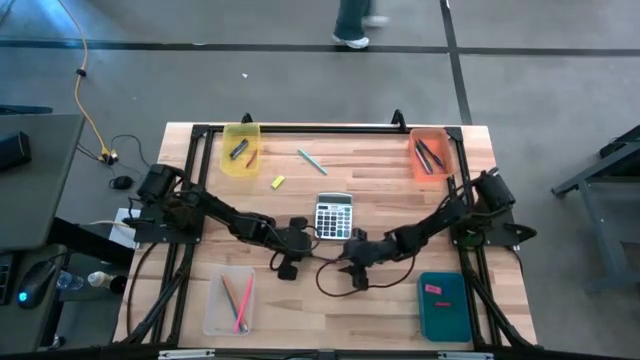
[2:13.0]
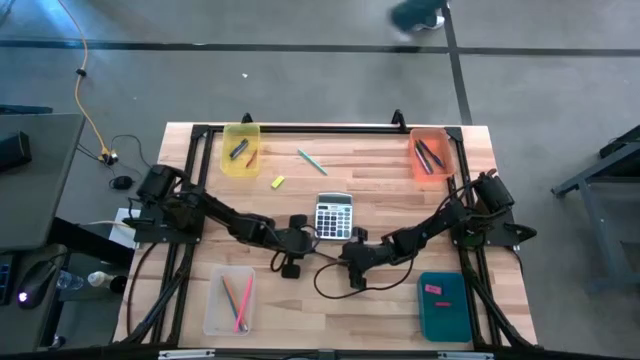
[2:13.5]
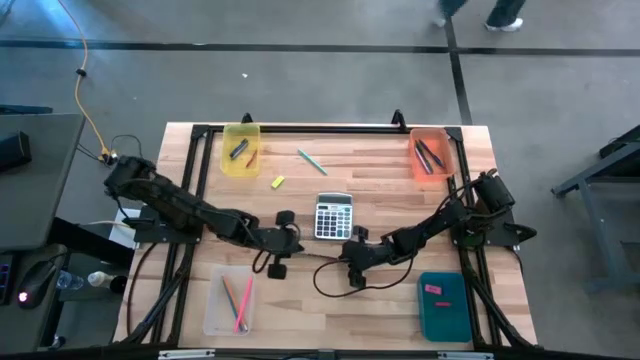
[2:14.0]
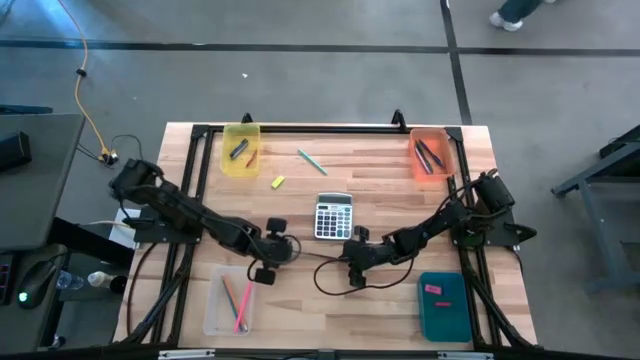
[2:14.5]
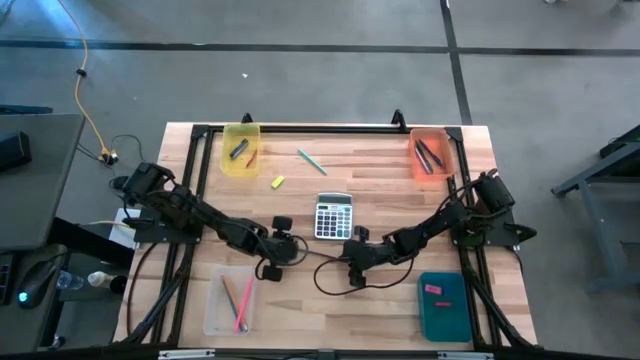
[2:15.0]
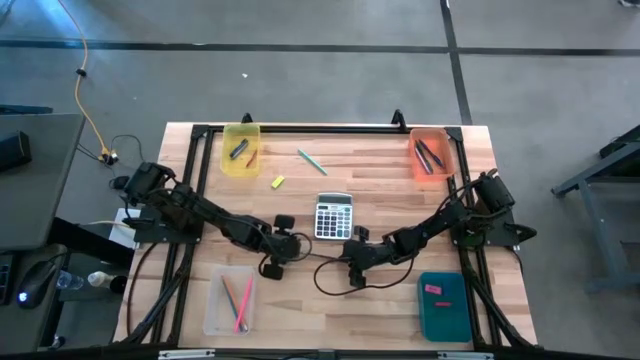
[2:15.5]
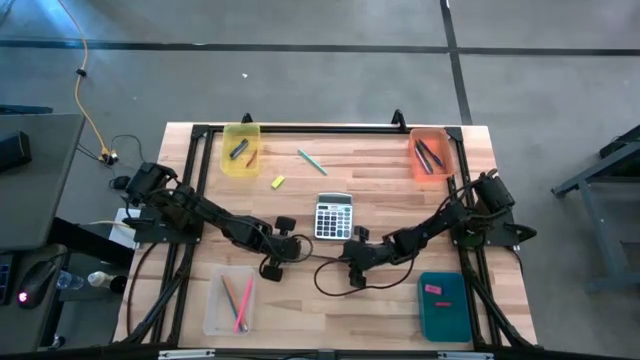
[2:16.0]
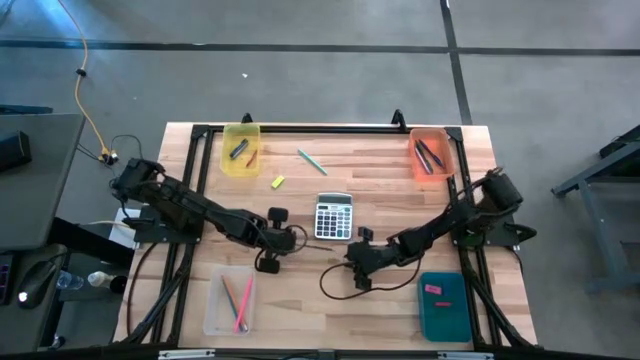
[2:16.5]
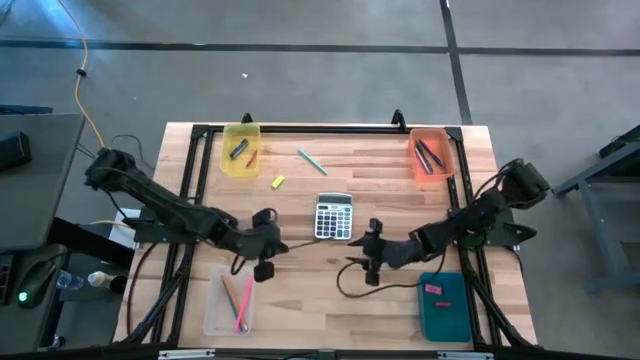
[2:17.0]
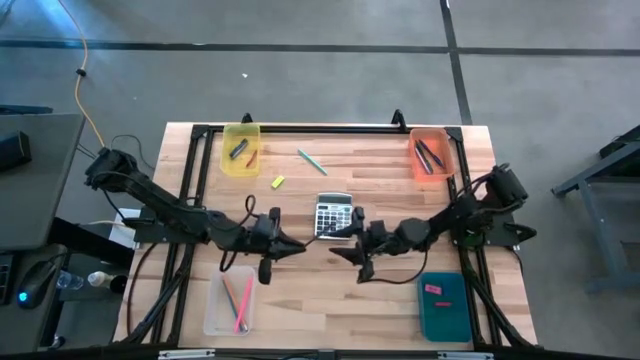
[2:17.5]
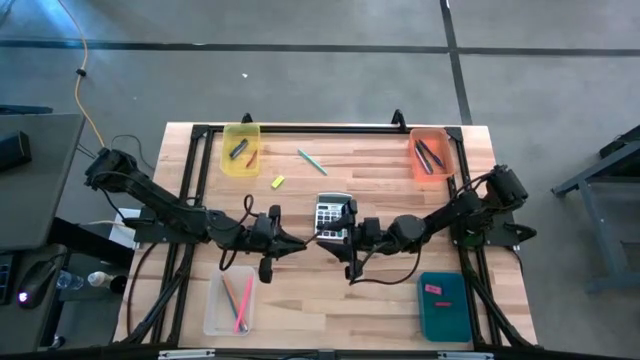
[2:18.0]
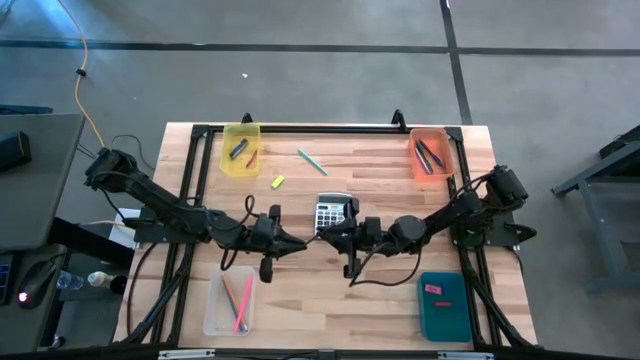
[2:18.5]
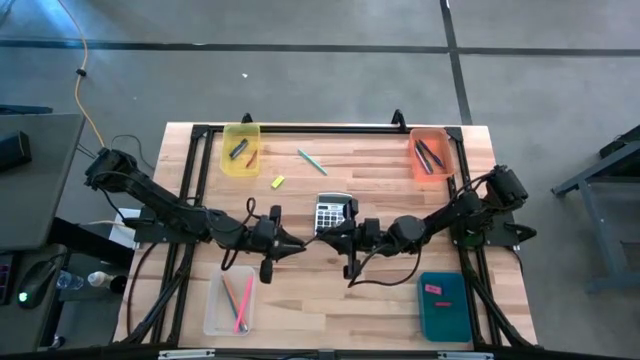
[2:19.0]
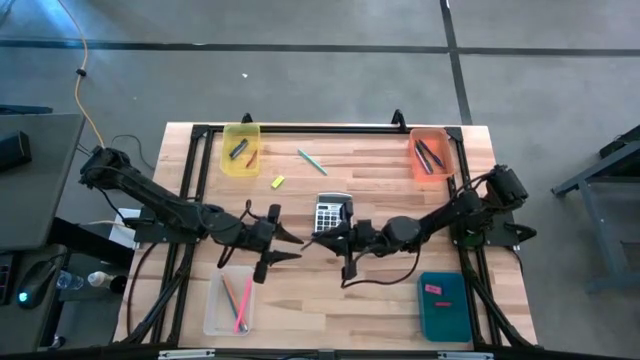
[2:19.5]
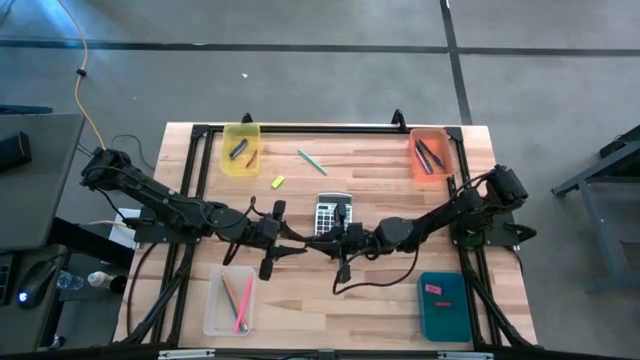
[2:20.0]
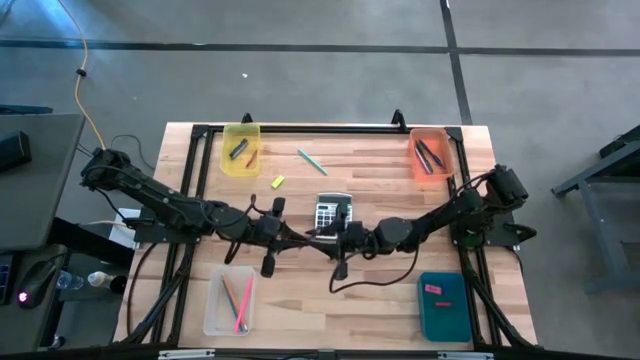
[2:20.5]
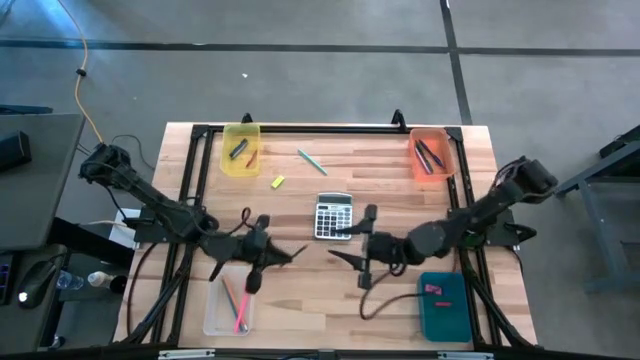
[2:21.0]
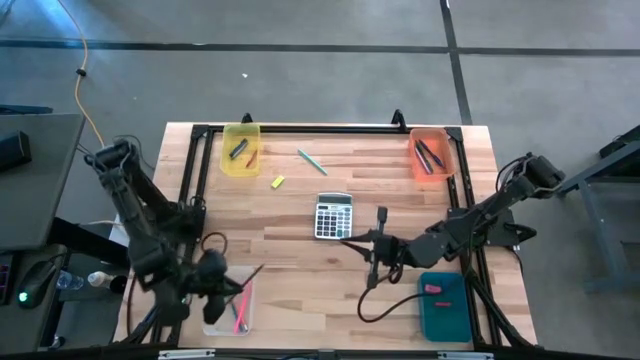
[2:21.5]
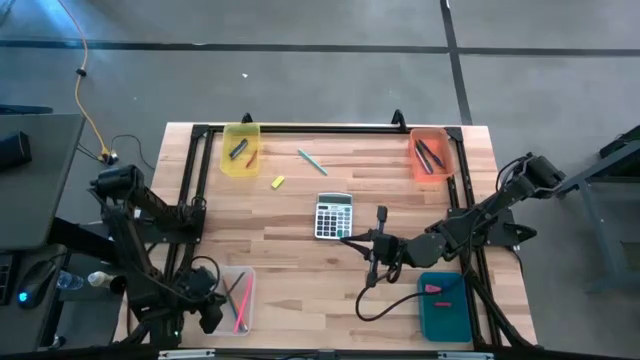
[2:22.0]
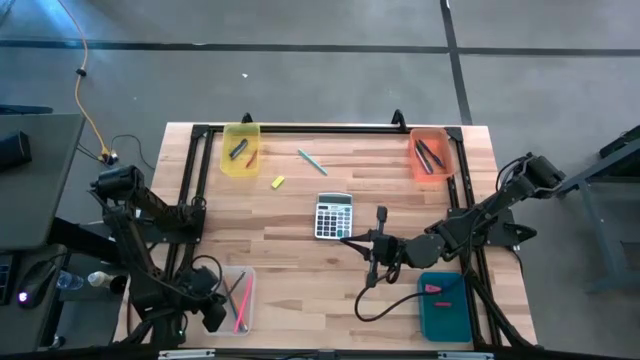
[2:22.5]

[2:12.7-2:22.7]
Task: Sort crayons/erasers/pens/pencils in bins
Put the black colored pencil into the transparent bin

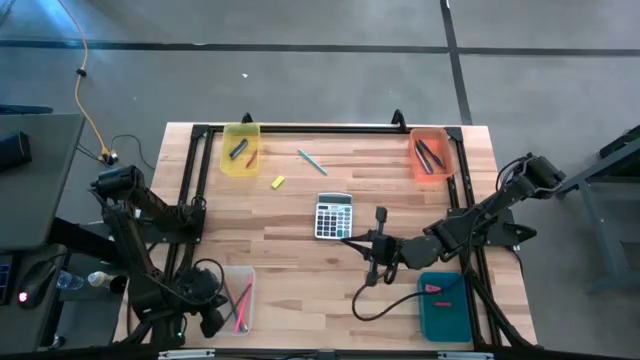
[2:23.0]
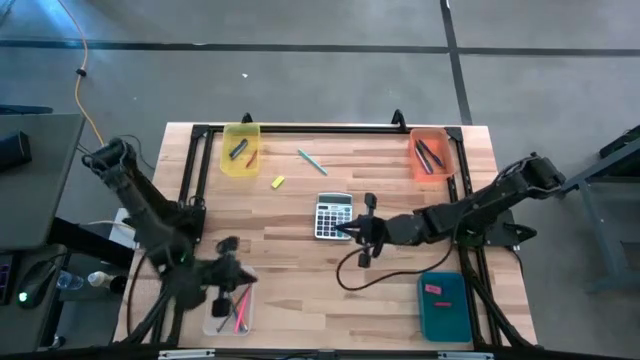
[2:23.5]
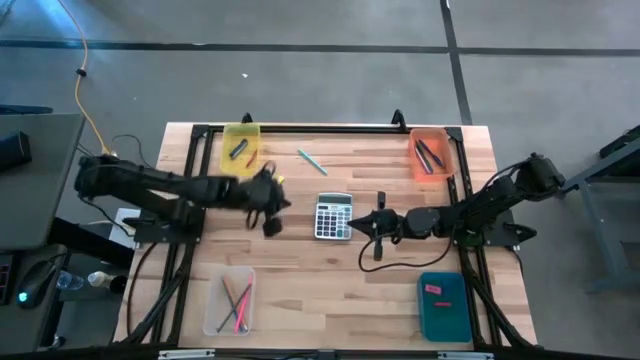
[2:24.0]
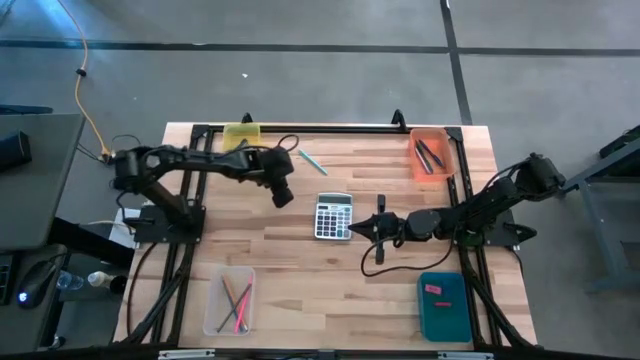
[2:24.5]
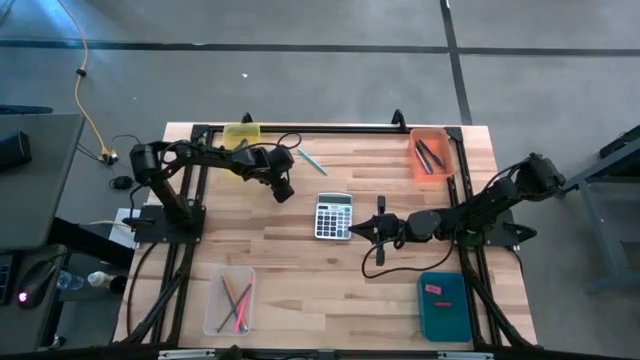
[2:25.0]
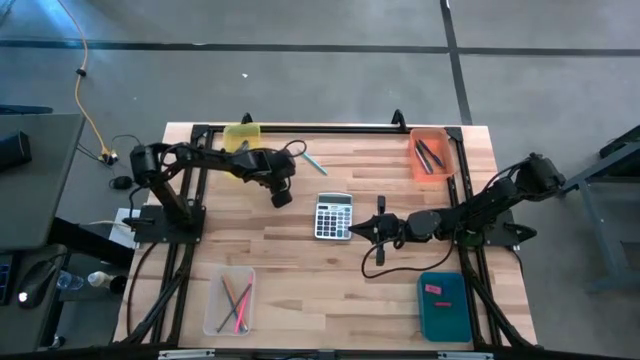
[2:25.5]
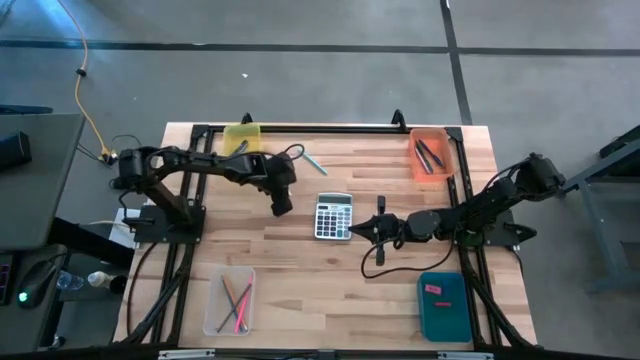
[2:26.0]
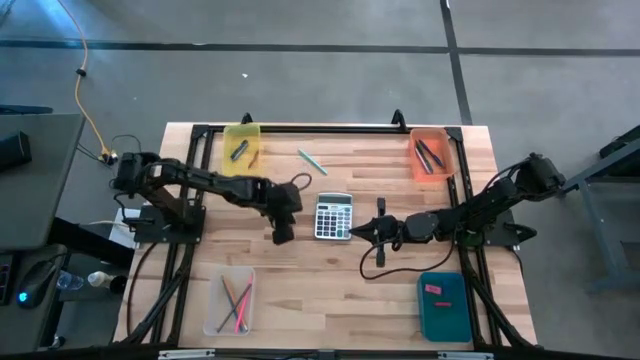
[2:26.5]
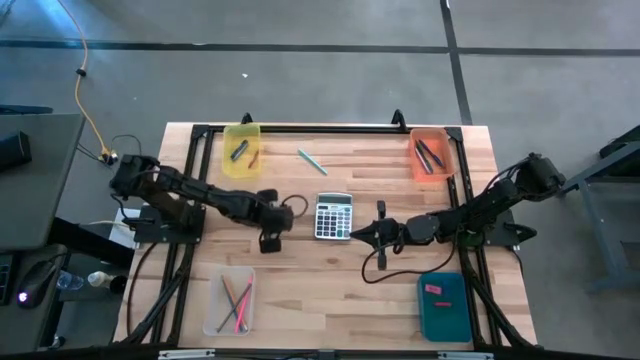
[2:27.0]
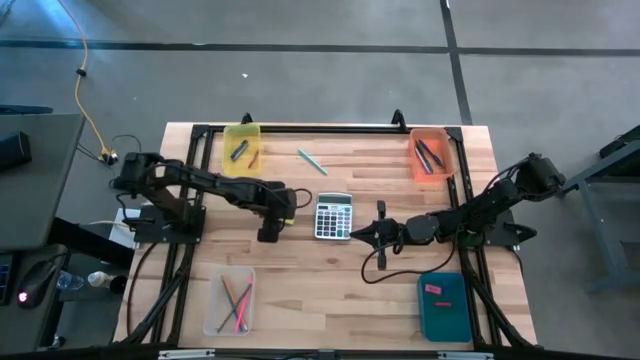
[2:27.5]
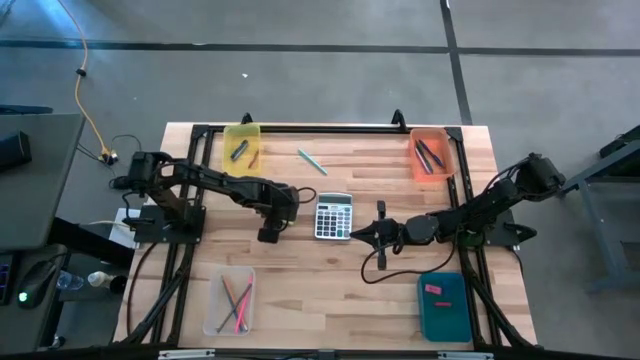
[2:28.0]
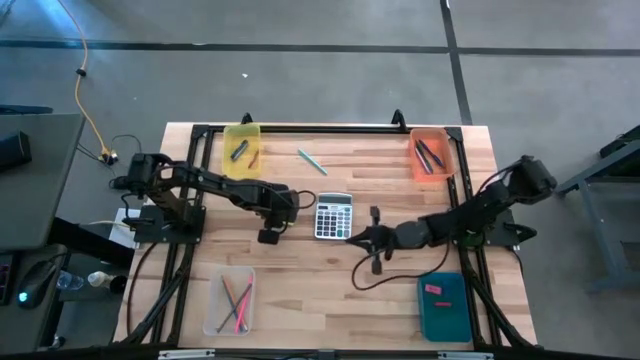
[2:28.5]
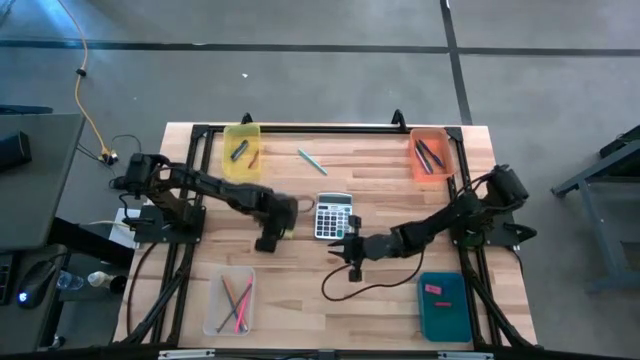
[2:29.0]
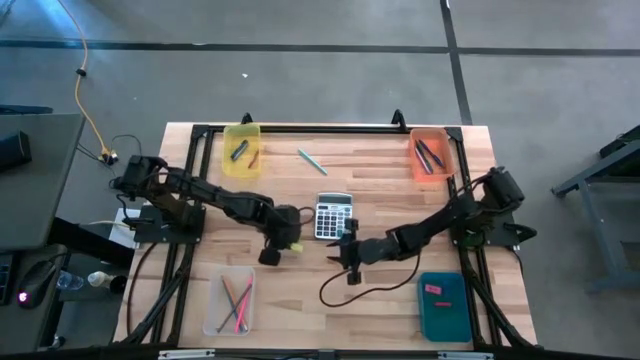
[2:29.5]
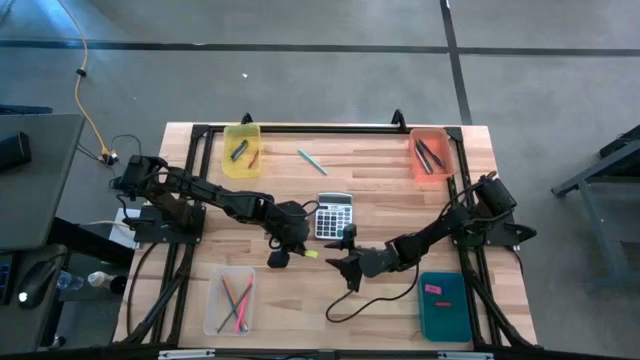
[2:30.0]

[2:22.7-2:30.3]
Put the light green eraser into the blue bin

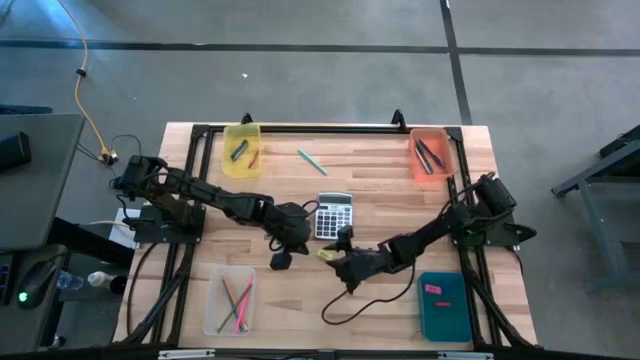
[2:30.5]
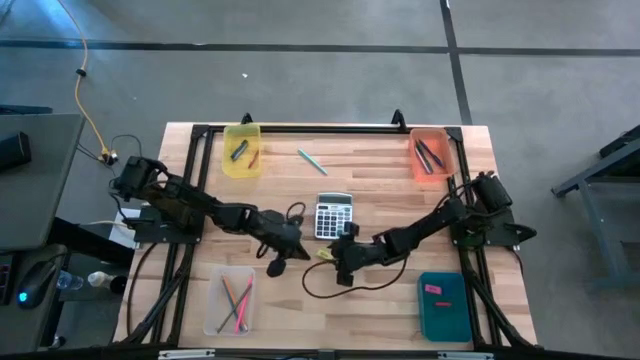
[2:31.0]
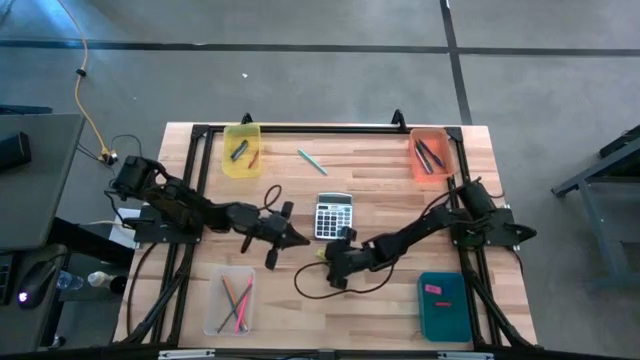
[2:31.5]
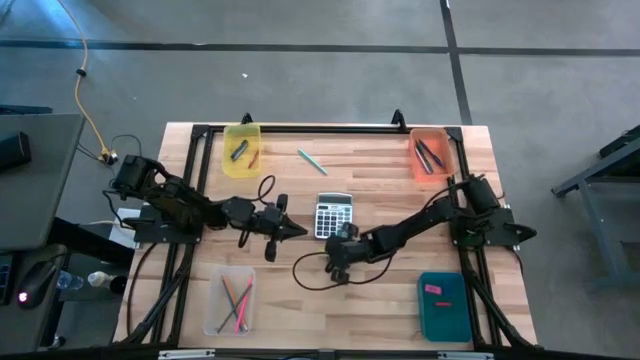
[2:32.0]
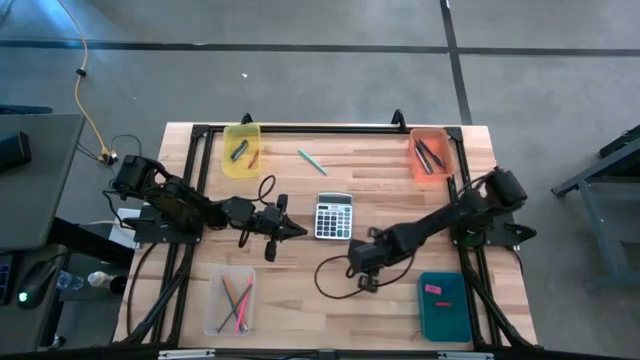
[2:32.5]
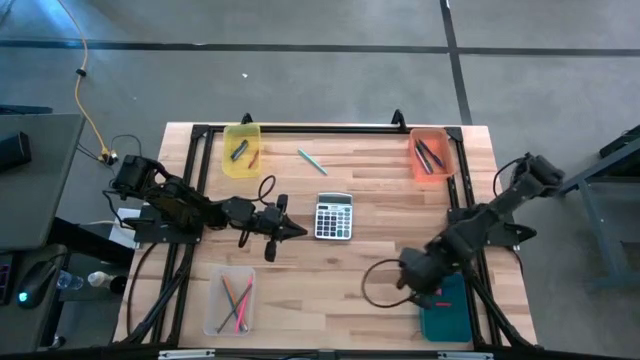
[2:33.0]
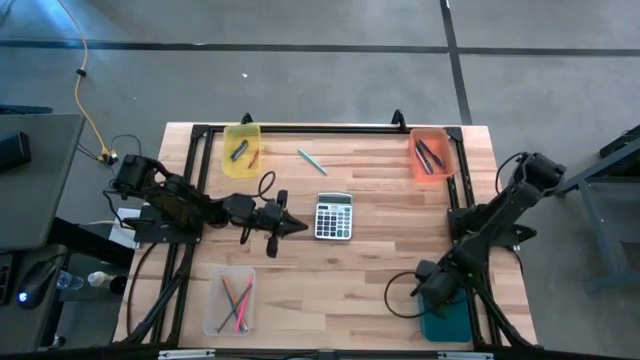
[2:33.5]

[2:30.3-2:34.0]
Put the light green eraser into the blue bin
